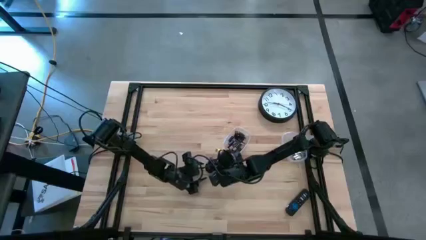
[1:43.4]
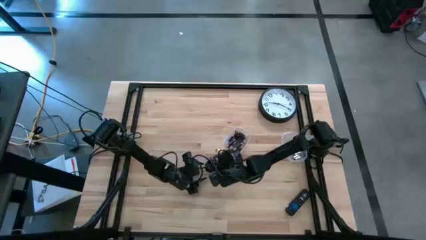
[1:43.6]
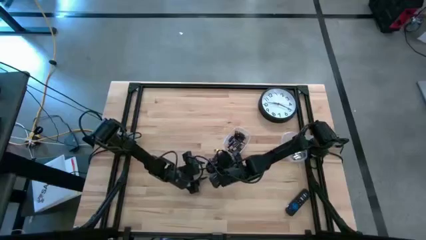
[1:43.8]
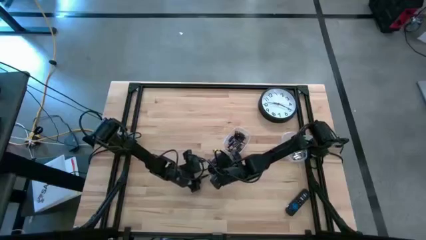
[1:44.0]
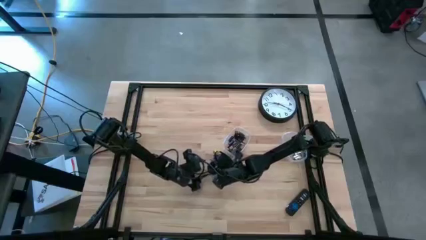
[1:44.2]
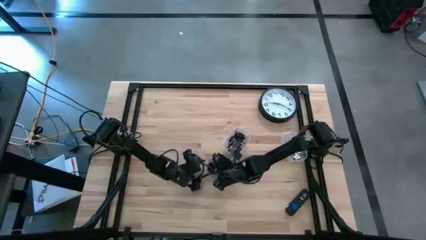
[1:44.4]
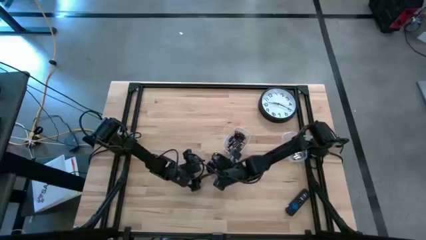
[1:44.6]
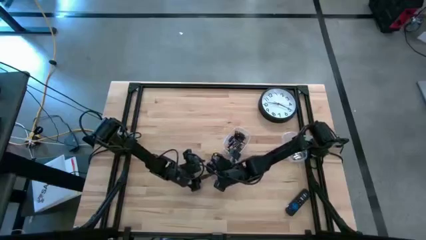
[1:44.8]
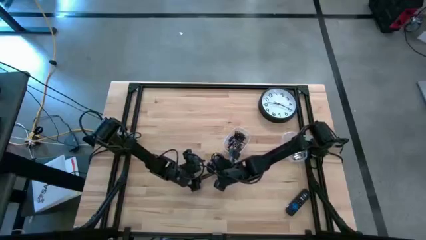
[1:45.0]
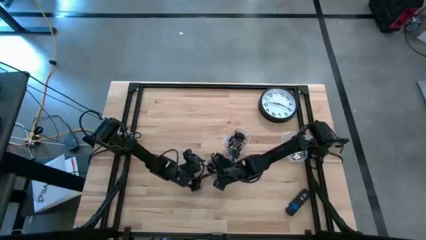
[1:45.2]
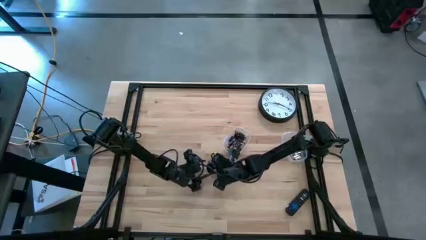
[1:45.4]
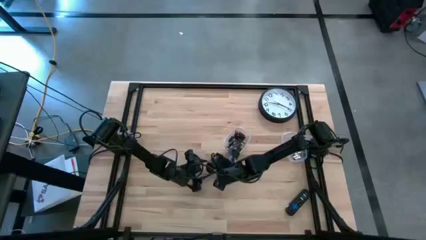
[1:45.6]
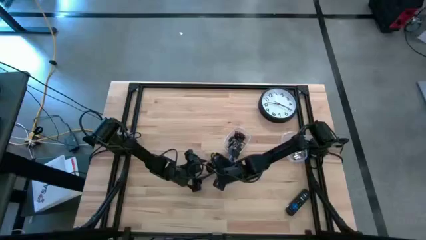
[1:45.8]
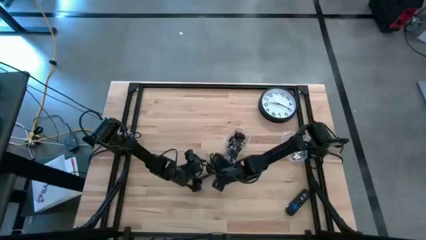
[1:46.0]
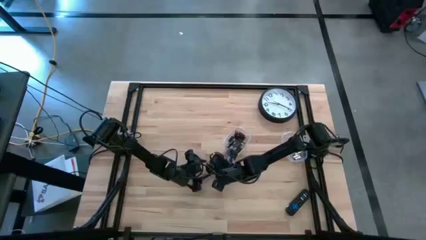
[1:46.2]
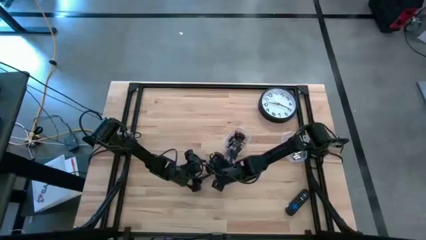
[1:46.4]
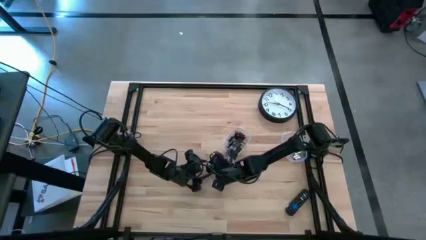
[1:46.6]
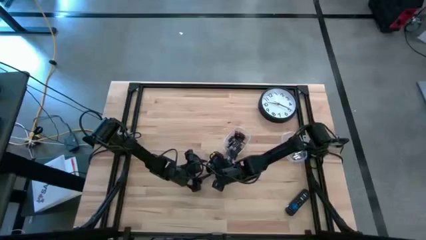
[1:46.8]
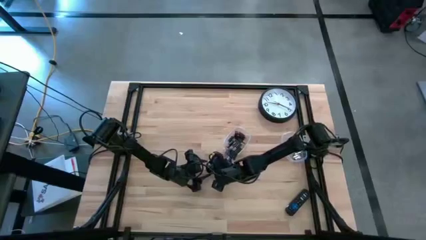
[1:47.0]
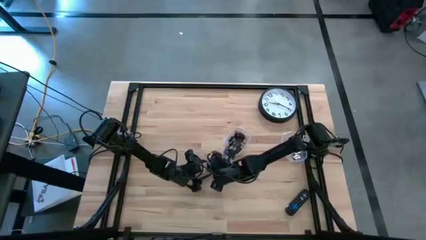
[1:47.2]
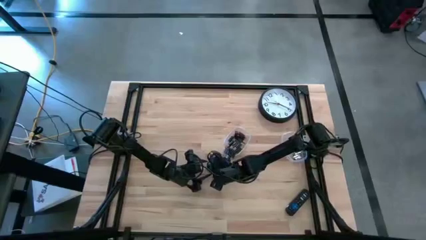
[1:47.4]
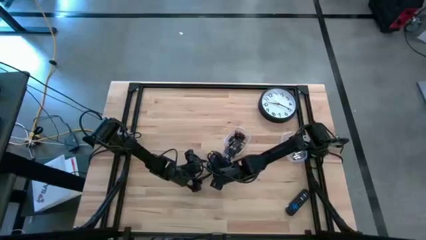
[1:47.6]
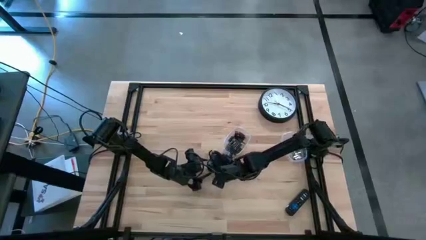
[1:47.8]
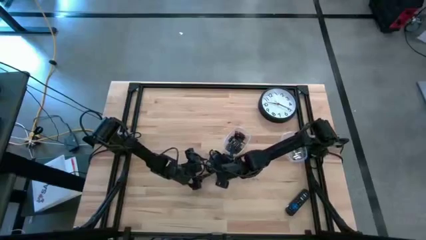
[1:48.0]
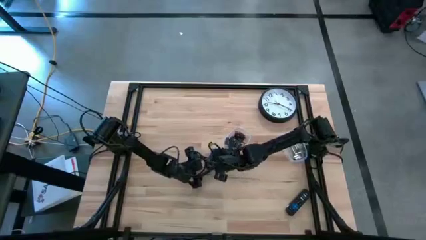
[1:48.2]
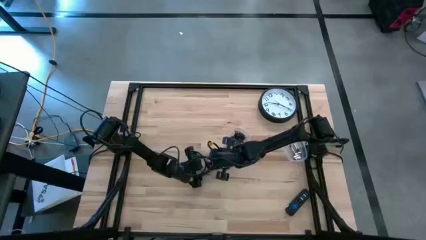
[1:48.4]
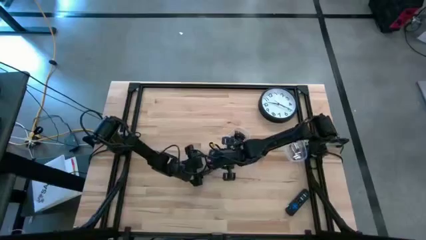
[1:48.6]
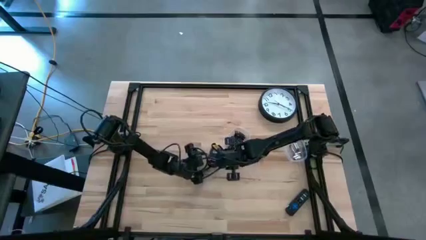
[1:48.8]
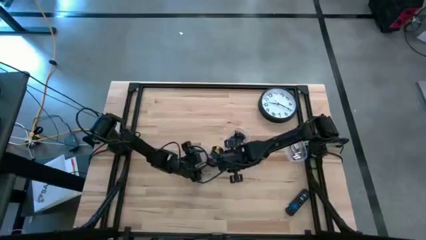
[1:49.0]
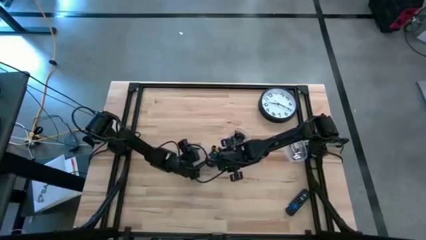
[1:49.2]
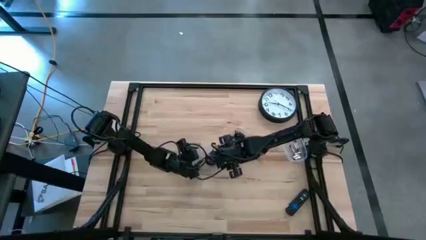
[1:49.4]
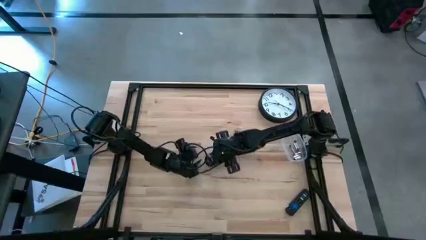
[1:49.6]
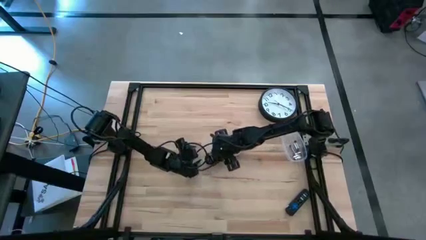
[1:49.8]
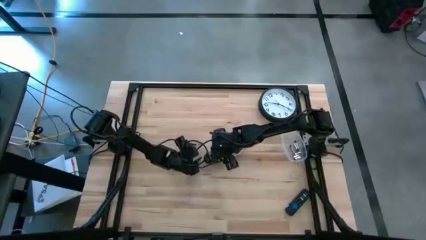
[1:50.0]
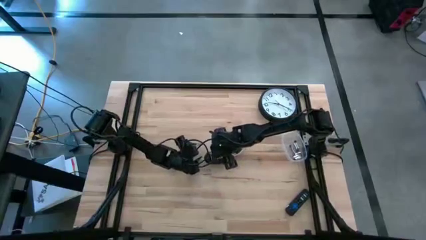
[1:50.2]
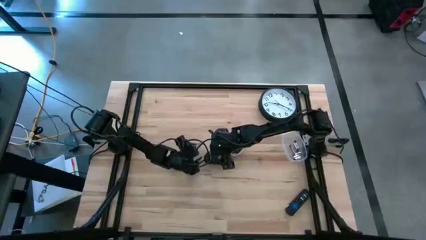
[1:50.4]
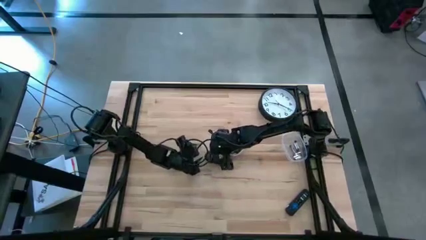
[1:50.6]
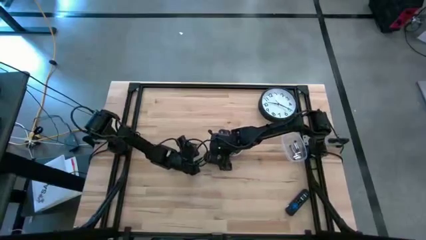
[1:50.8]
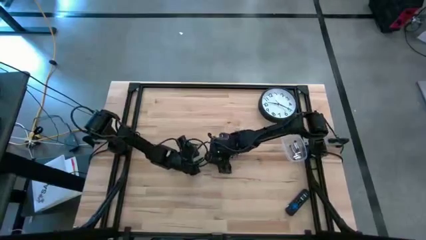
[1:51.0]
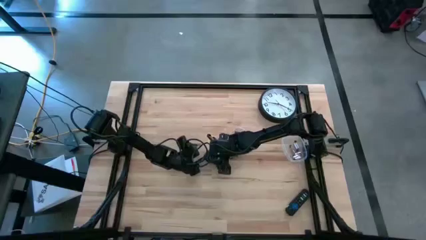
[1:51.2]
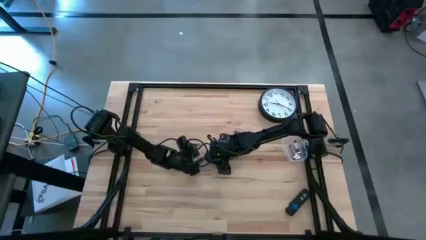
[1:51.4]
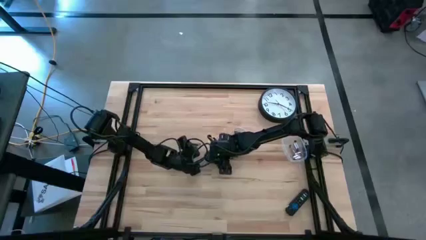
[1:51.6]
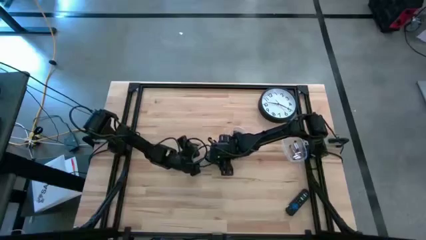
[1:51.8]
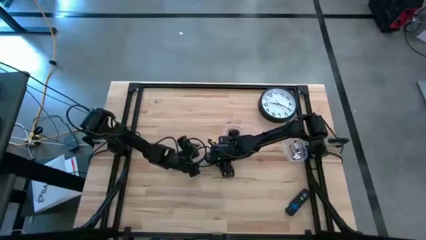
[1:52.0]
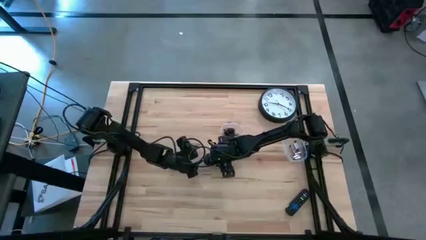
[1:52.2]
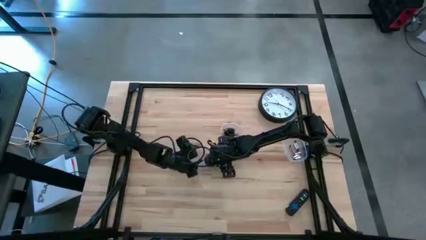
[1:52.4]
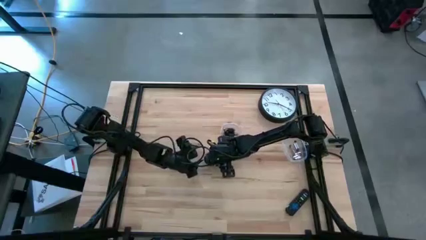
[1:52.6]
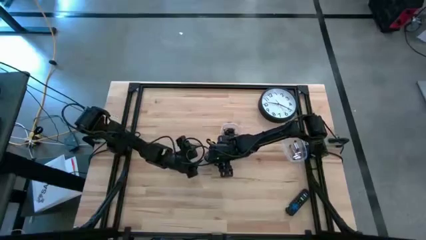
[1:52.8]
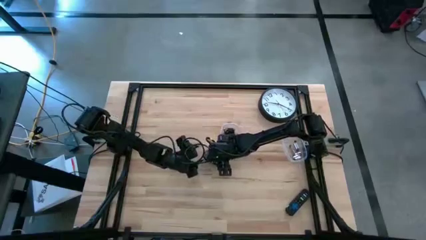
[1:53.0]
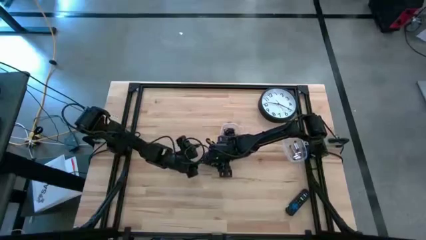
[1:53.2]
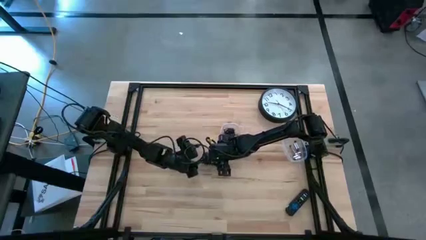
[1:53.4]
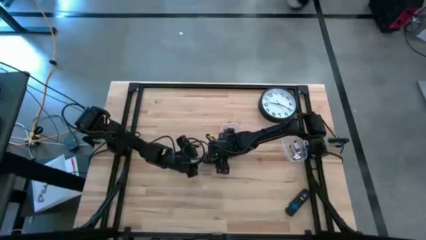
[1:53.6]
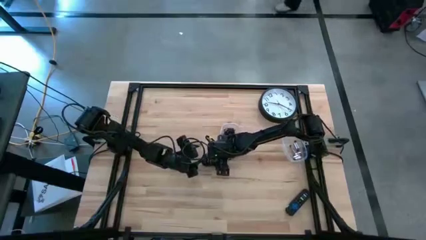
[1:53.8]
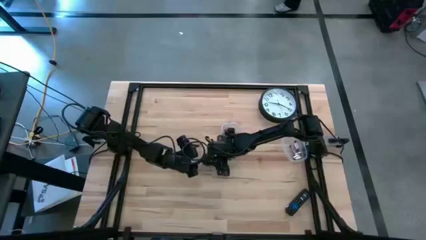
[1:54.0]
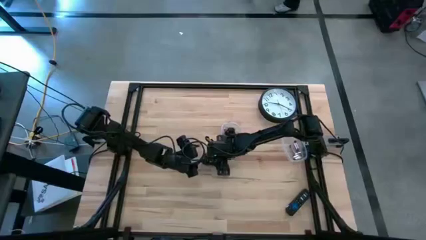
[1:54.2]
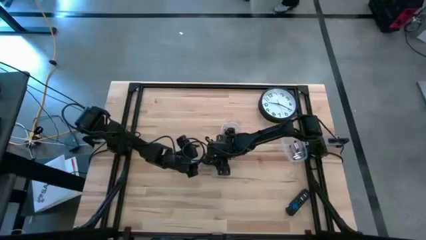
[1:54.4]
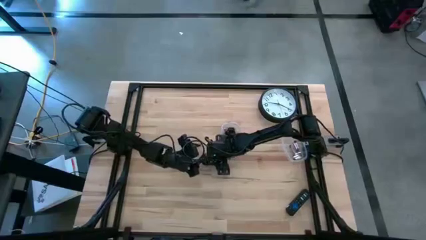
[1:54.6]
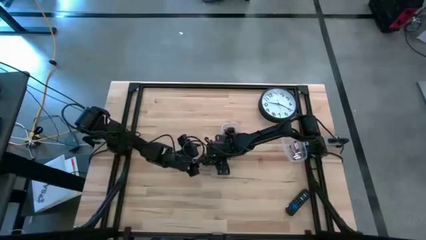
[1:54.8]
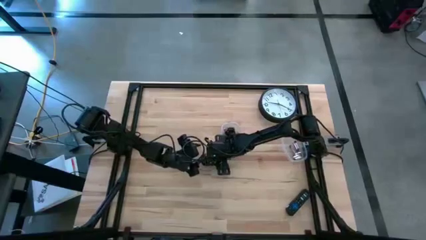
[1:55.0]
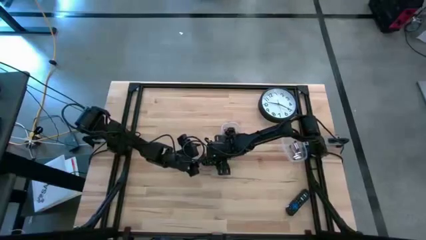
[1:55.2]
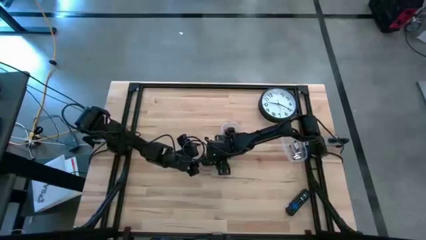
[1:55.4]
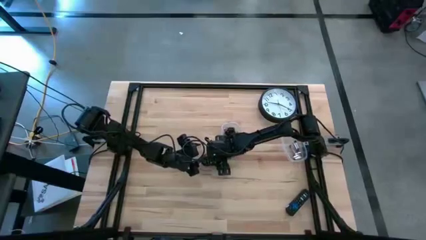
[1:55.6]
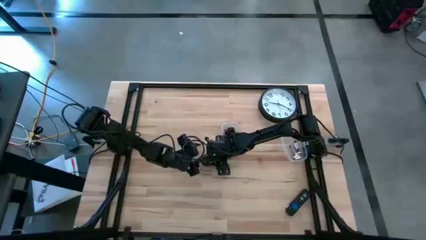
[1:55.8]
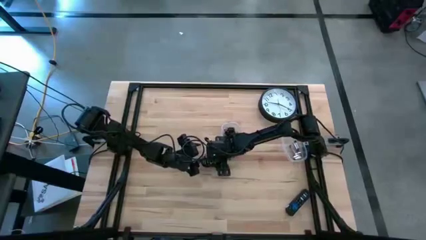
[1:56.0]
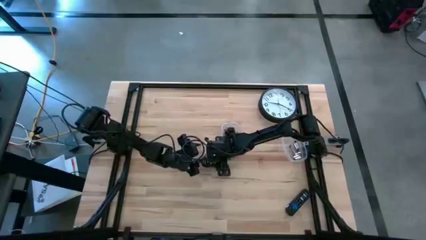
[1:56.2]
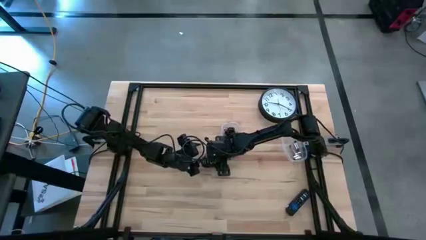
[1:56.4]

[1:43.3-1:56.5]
Task: Insert battery
Insert the brown battery into the mouse's battery compartment

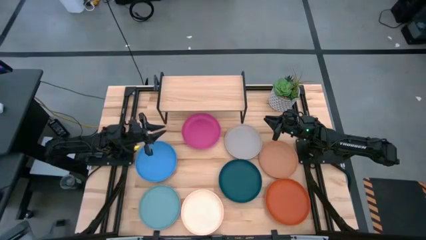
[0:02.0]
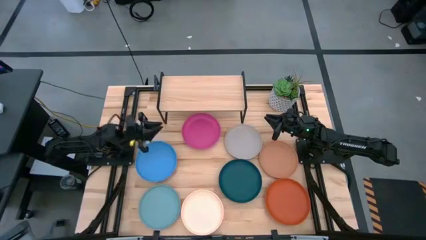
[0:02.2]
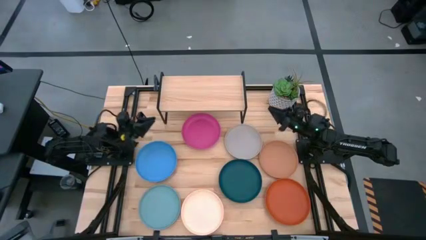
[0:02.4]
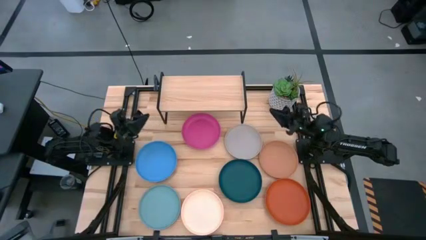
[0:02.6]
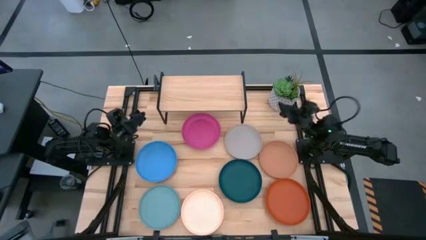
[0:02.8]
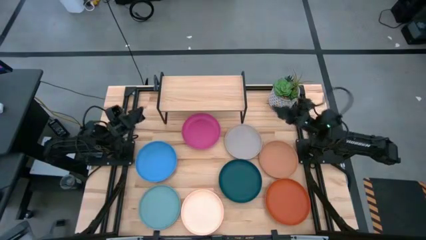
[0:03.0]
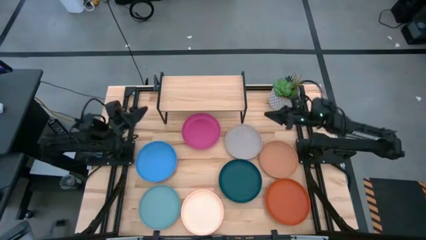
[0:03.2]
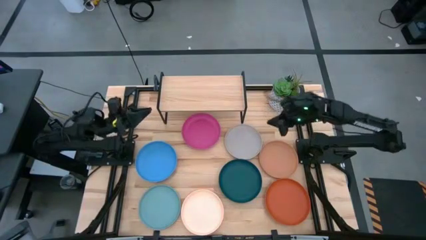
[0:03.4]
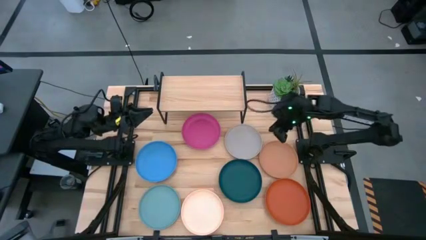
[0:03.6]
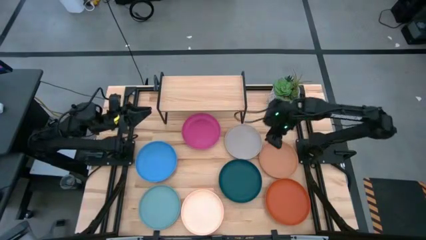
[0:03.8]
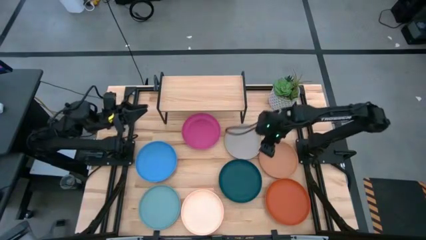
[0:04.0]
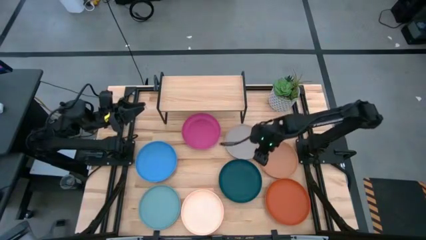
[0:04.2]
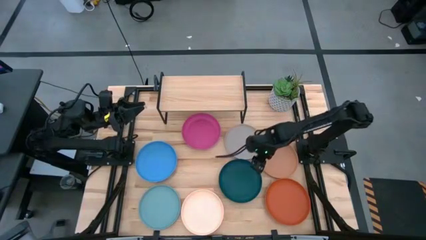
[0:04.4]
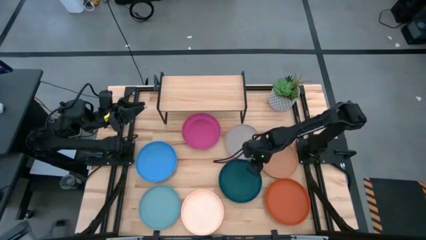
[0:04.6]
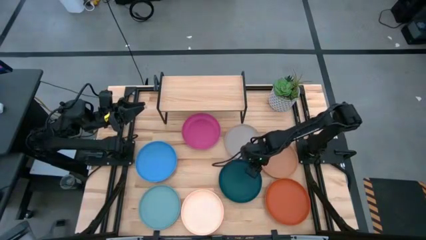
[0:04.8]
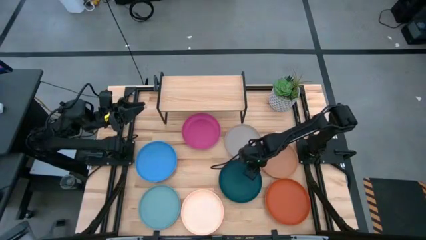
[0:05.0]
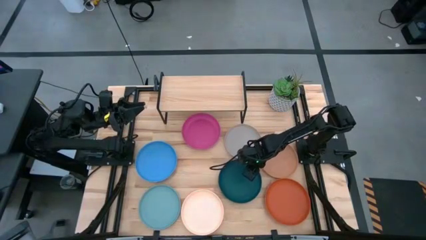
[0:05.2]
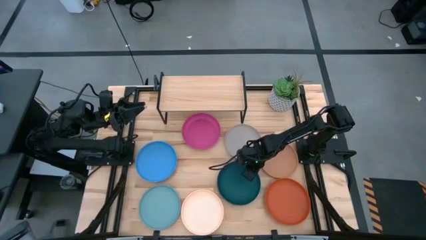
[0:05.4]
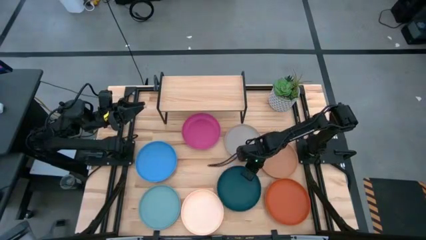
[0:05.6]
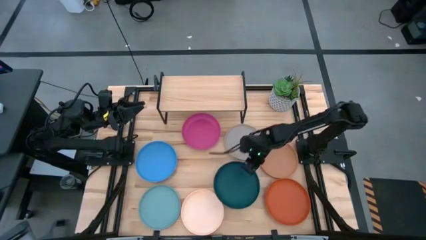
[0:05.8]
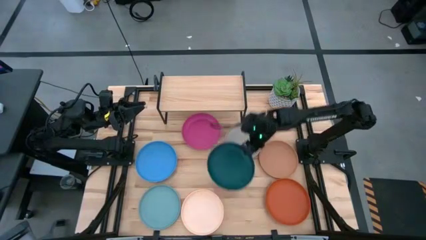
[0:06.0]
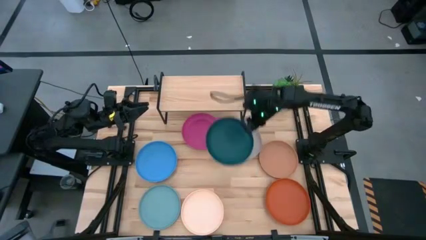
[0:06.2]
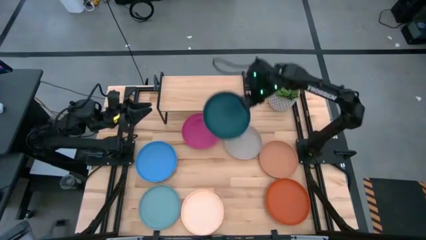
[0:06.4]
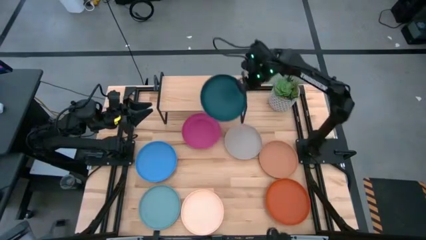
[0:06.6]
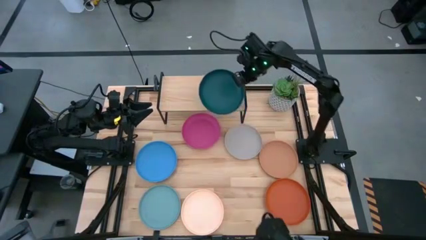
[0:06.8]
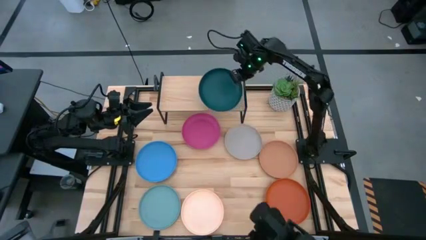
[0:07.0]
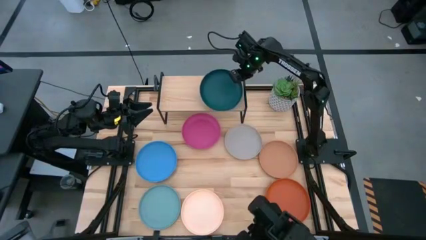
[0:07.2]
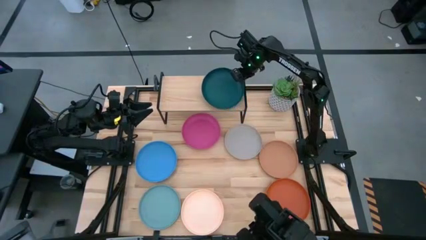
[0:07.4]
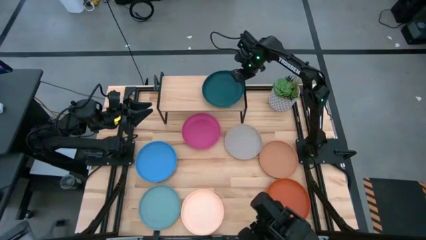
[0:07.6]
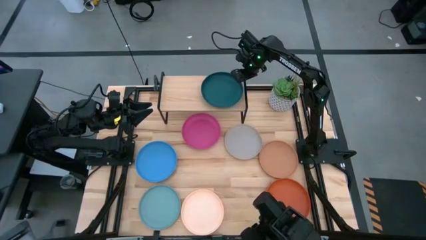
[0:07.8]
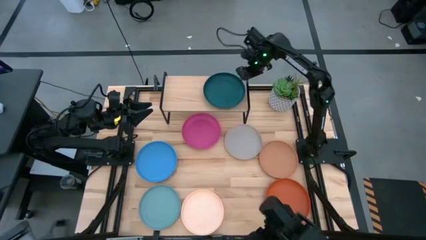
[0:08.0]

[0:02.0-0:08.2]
Task: Place and stack plates onto a shelf
Put the dark green plate on the shelf
